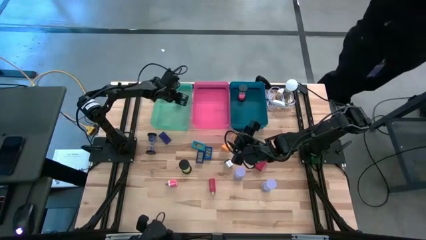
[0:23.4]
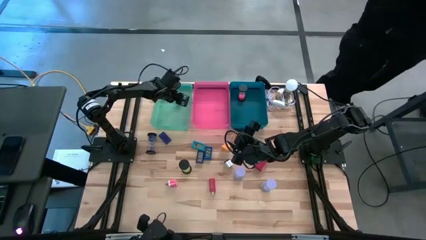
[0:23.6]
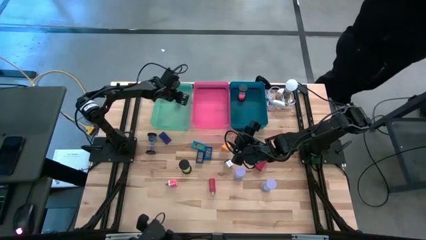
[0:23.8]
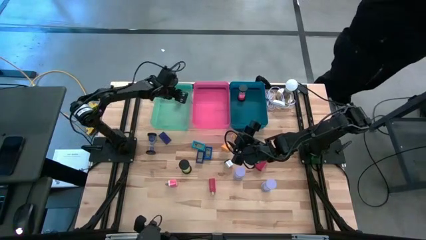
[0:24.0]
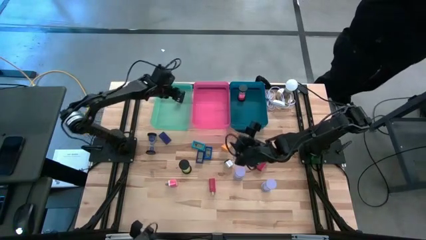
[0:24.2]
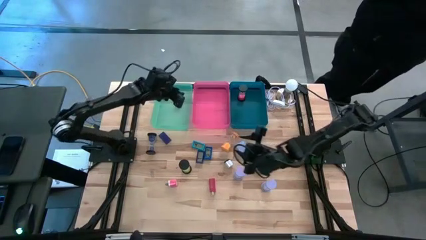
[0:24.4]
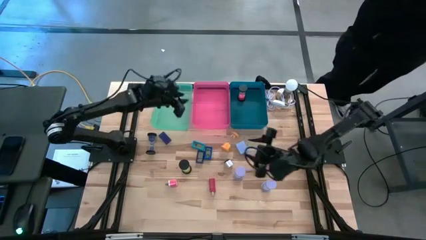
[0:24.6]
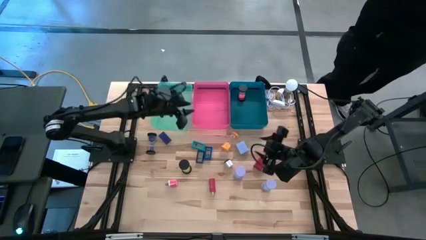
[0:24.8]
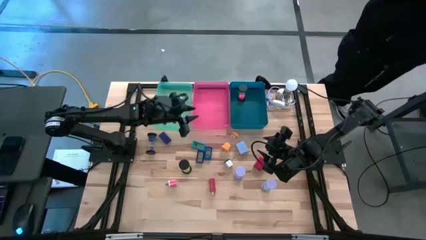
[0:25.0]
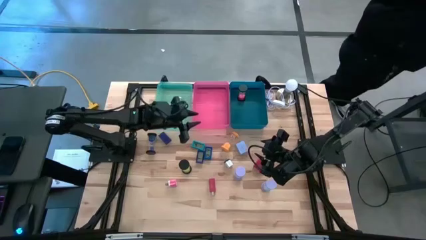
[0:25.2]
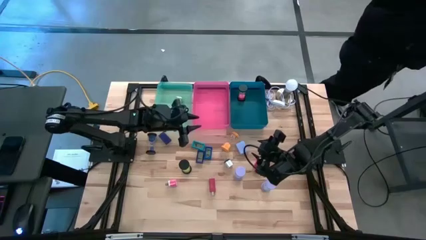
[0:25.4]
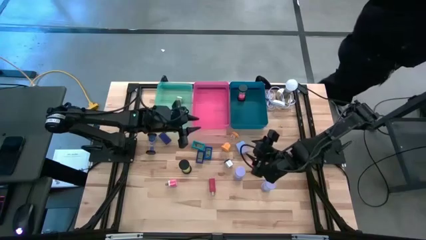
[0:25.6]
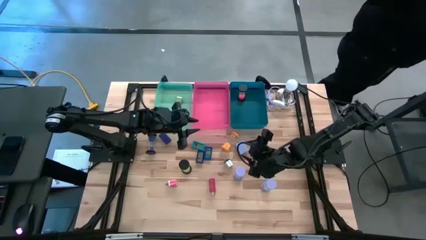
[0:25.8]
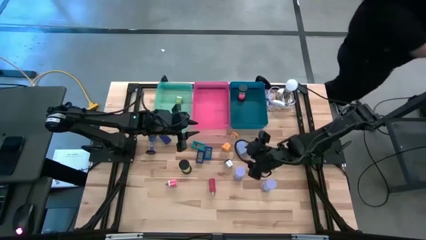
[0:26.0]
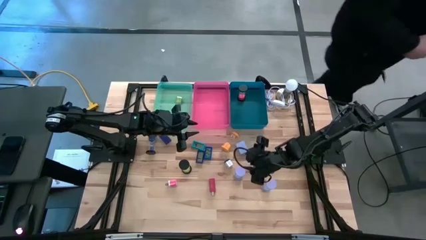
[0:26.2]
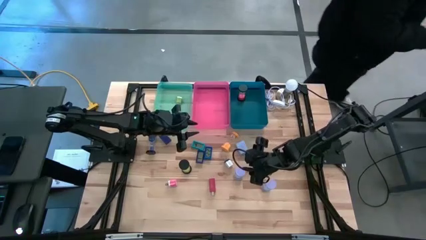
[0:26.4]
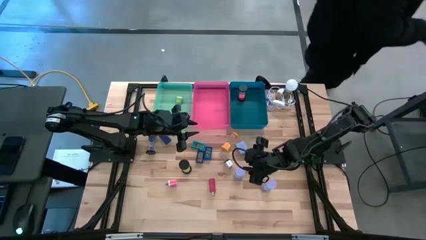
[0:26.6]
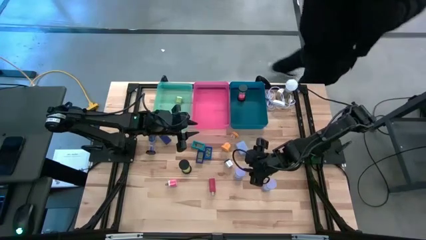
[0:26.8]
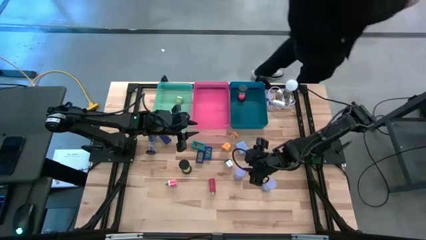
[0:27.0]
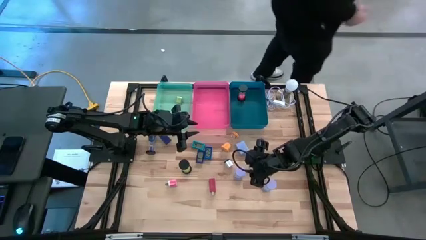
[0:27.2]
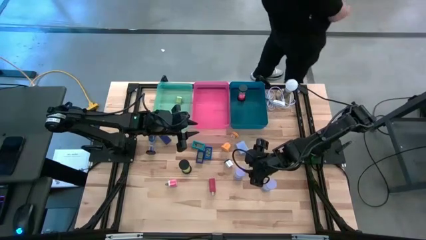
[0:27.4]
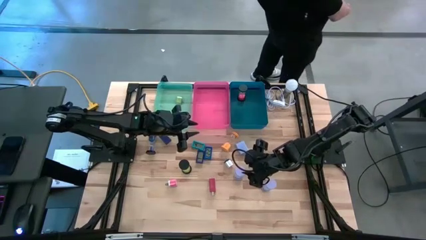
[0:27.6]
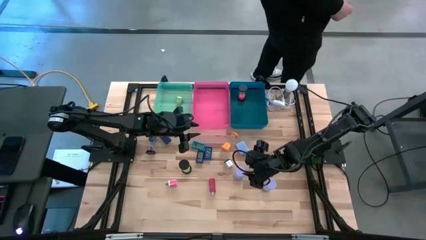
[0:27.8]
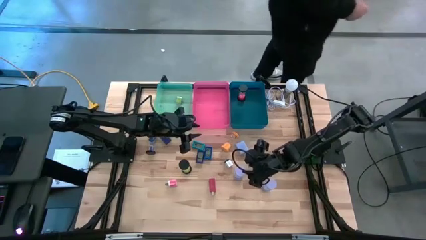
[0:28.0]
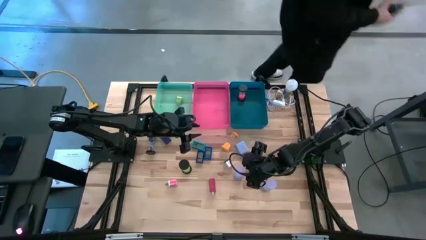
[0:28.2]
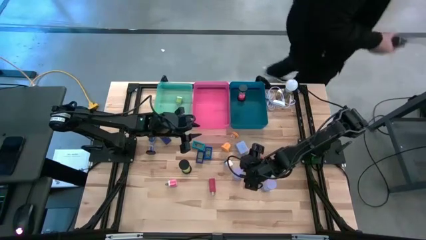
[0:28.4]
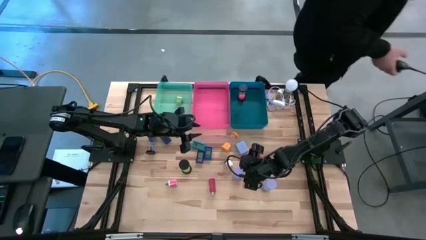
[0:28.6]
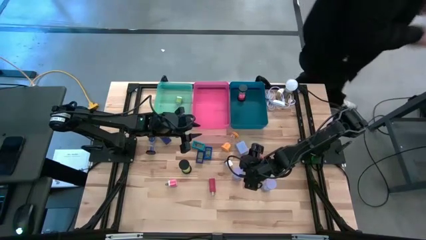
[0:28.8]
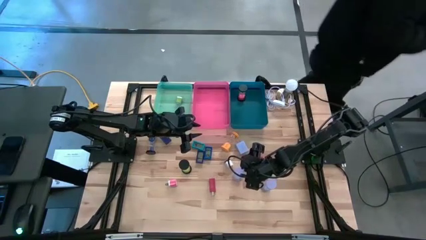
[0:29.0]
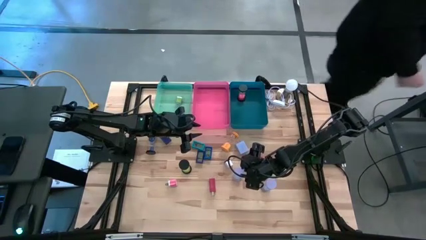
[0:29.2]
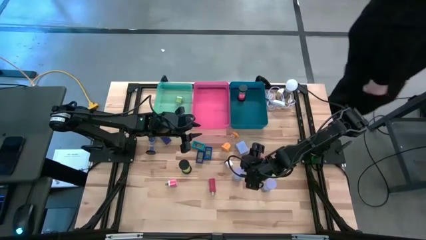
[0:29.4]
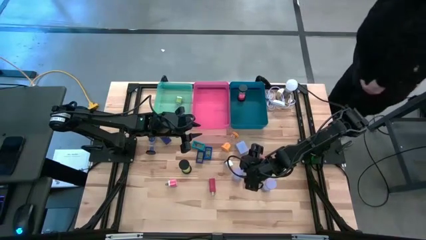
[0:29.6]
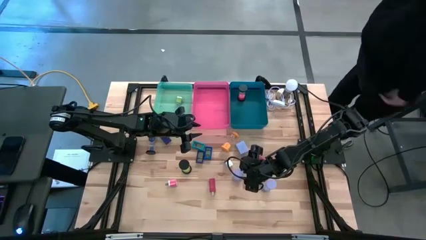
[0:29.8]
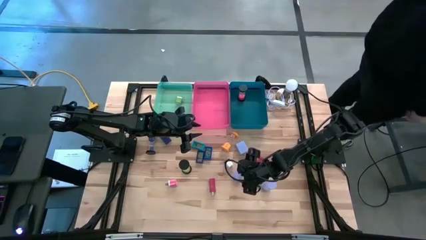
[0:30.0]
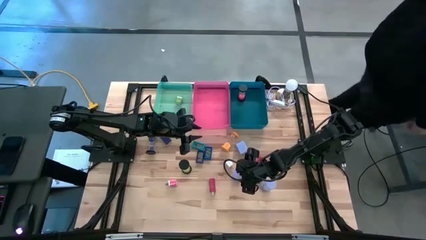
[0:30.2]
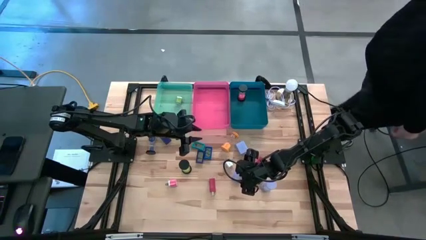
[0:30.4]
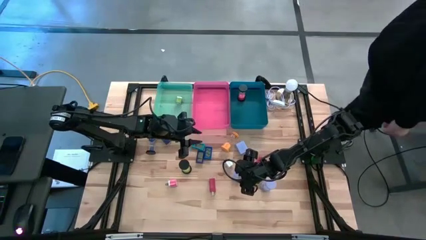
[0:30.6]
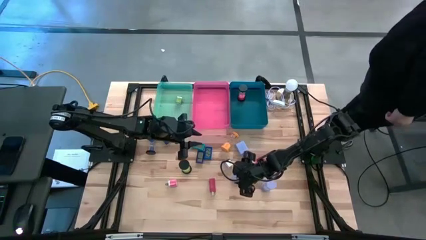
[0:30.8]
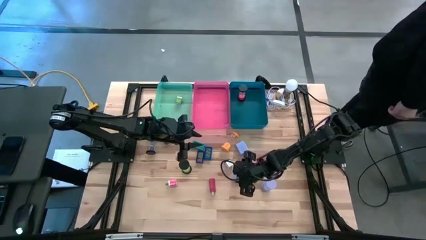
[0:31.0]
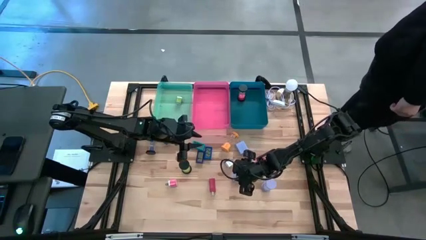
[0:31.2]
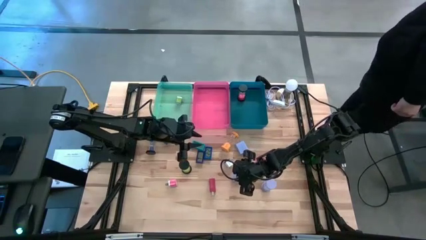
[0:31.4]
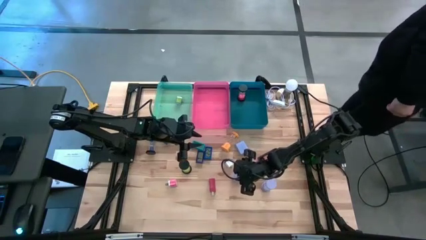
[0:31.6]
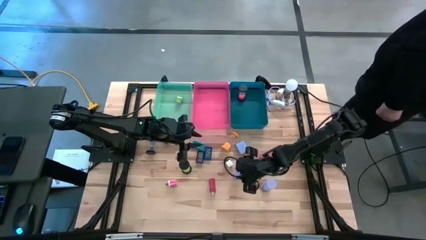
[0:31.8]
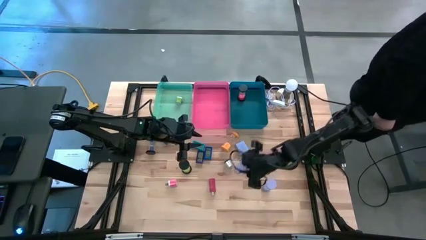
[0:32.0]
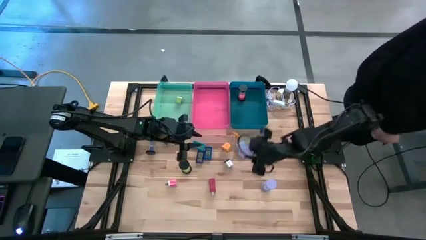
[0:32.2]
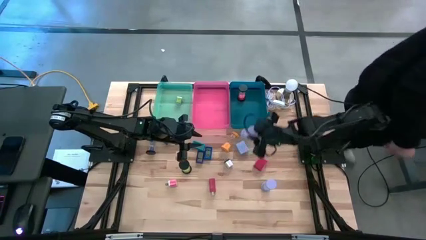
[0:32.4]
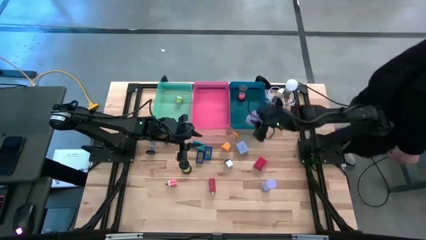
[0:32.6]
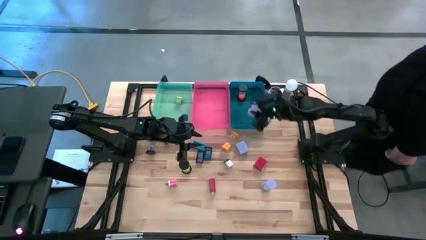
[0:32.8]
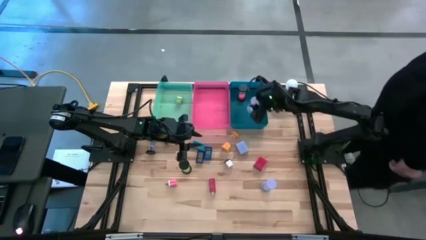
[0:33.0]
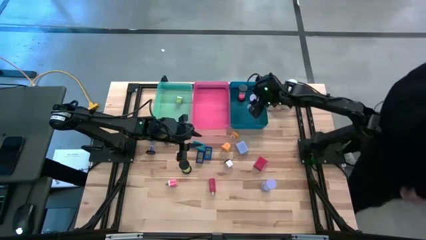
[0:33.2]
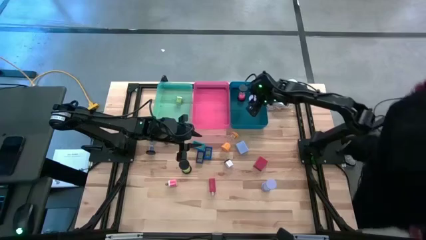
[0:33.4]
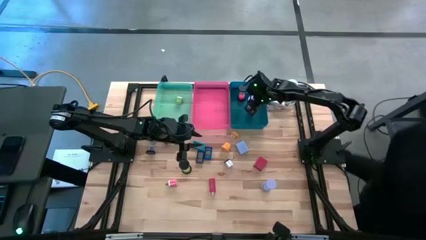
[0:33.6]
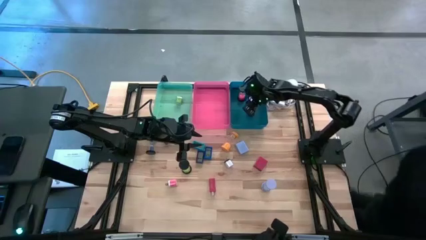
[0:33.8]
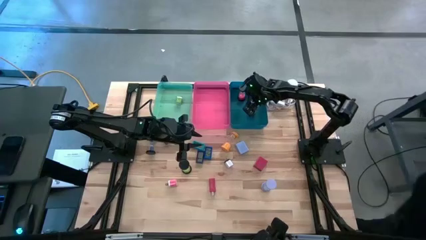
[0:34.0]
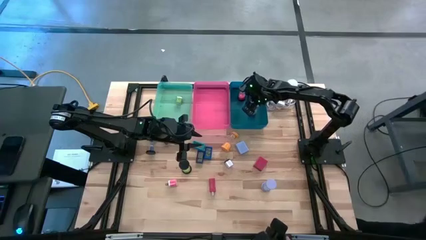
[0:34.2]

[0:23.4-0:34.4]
Task: Pick & Place Office items
Put the left violet hourglass into the blue bin

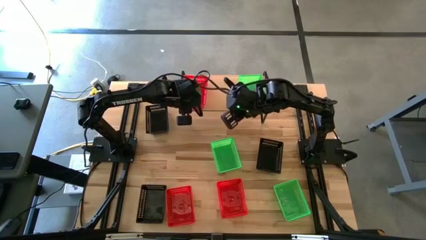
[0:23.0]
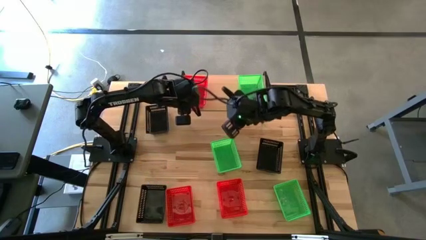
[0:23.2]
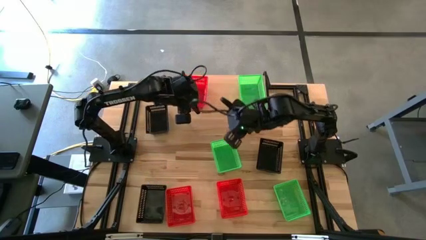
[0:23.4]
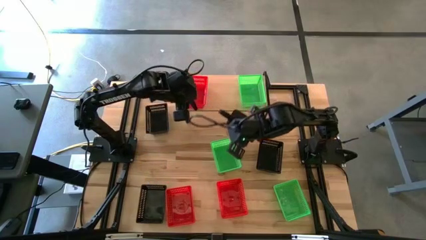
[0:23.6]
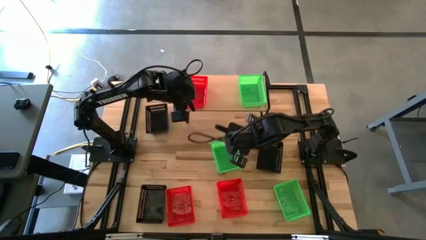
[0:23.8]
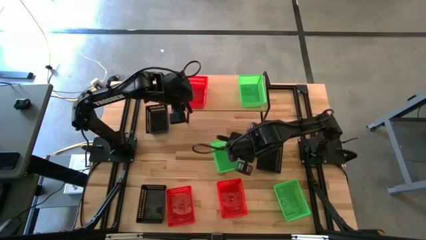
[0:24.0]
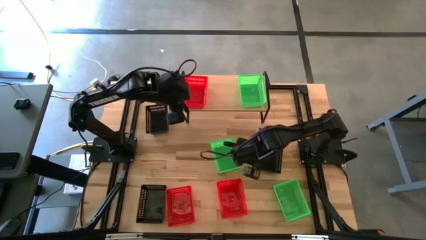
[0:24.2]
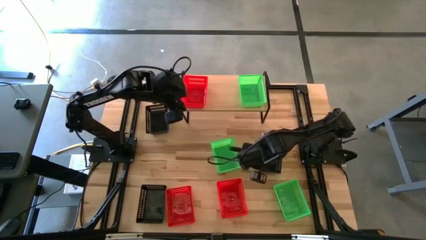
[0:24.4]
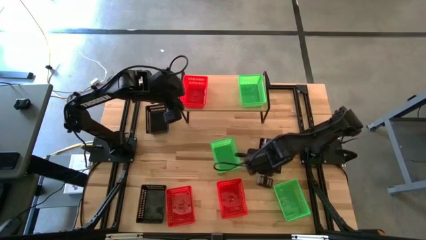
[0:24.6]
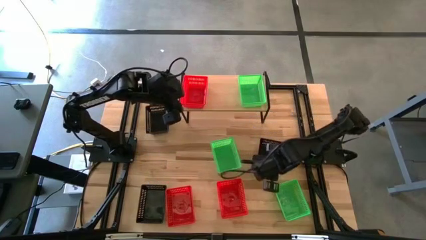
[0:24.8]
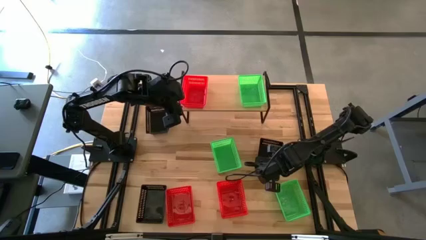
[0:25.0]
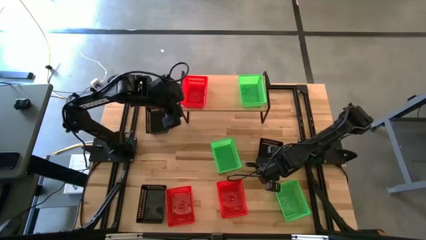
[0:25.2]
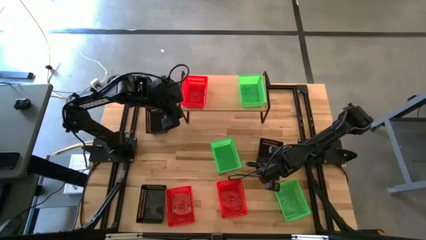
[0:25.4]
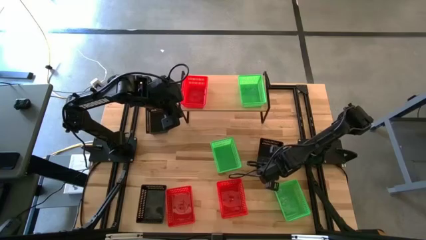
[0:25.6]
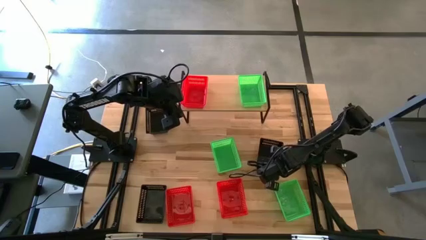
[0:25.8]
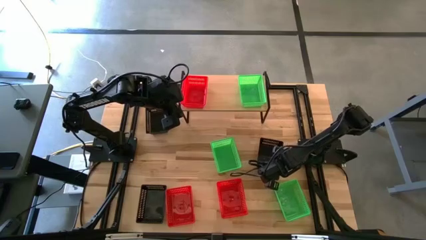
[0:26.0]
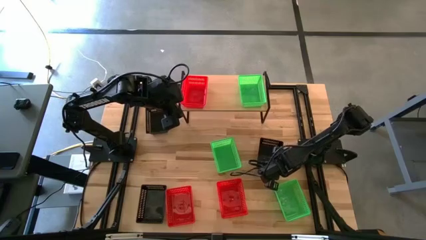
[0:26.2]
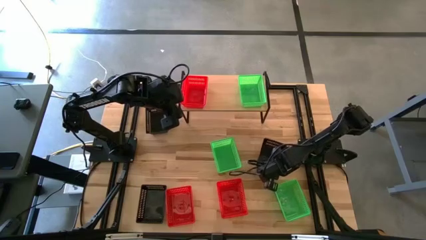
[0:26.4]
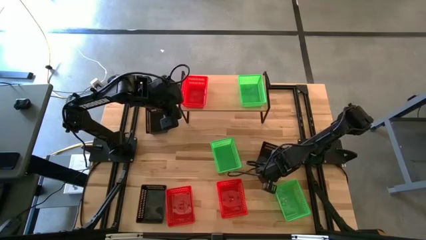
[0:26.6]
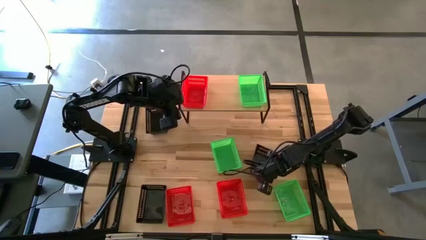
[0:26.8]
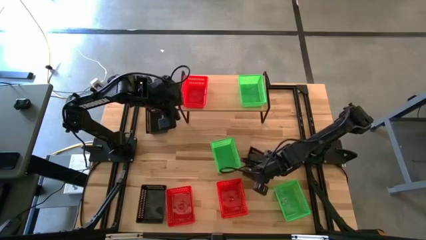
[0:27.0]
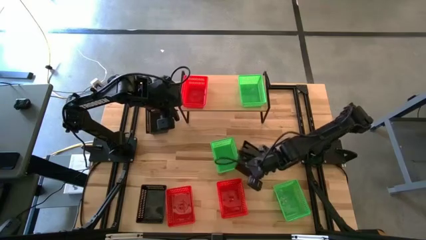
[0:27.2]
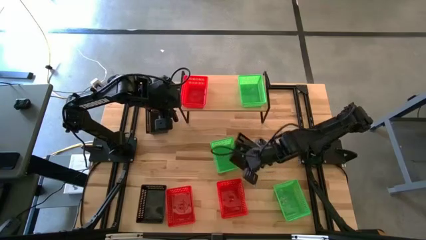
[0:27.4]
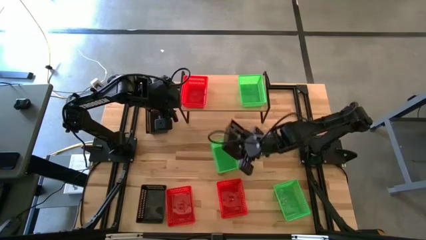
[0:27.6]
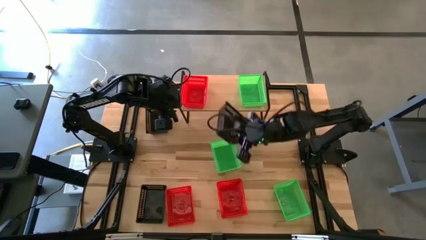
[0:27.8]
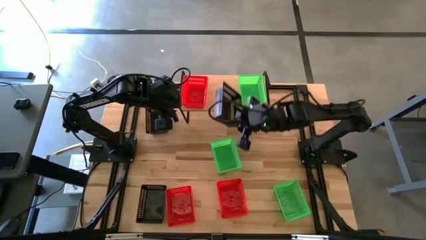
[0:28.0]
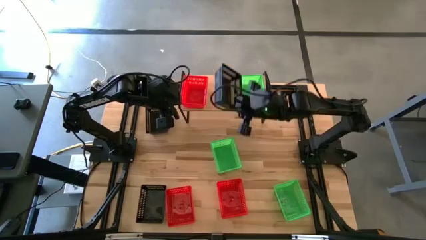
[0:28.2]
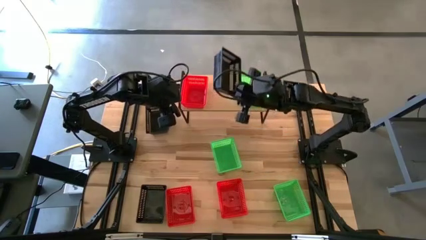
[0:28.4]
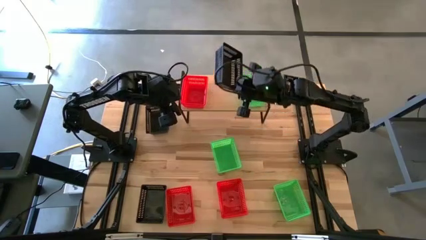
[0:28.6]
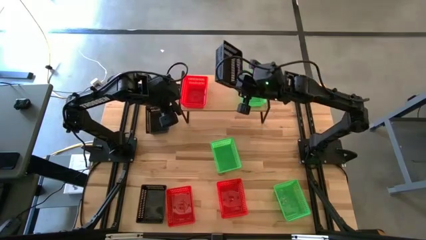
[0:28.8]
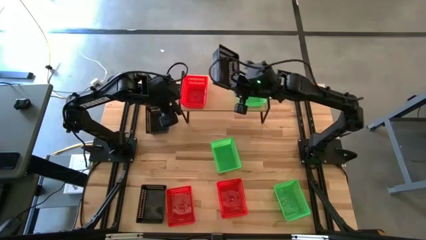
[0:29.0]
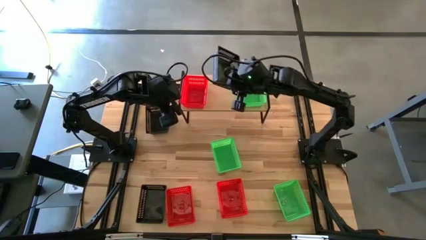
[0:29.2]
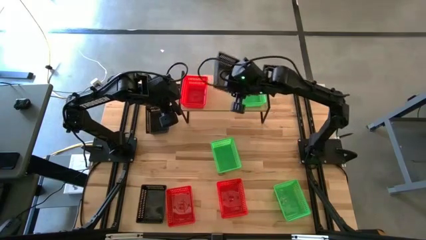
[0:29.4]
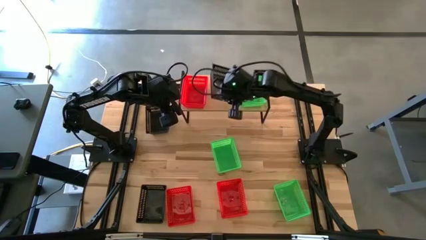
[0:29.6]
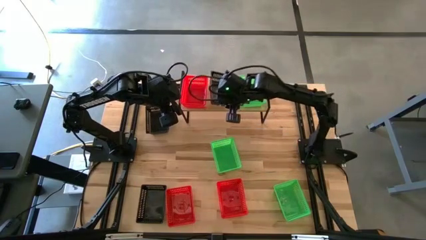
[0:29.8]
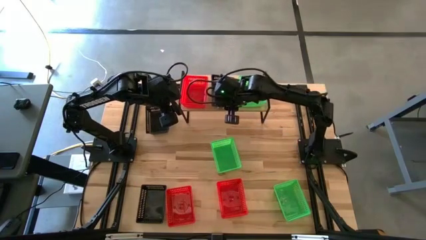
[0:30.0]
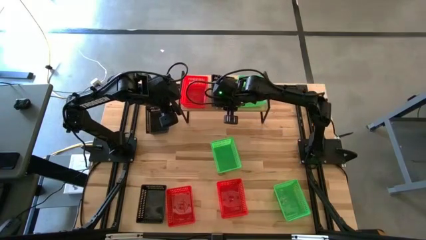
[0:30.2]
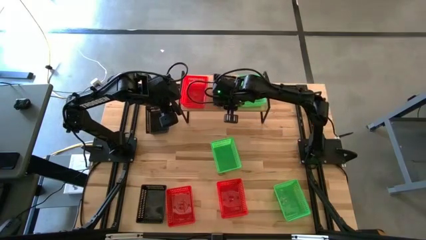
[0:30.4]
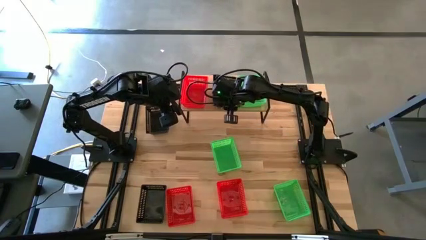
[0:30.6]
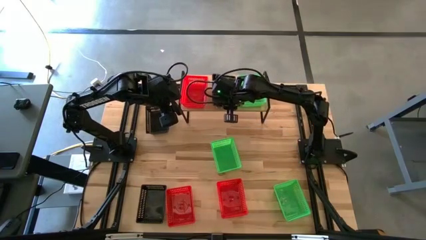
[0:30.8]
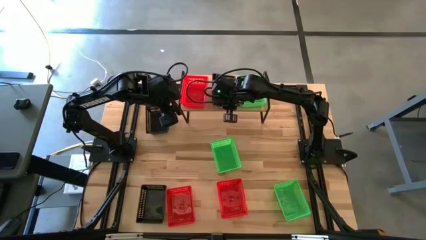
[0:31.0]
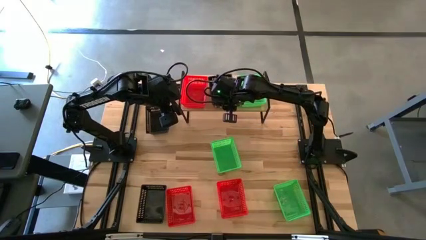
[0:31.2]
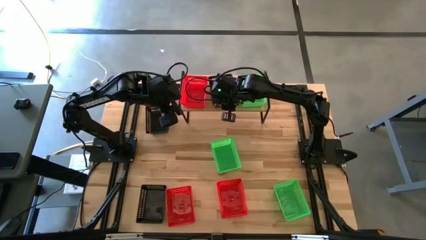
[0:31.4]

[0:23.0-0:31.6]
Task: Stack baskets on shelf by color
Put the middle black bin on the shelf
